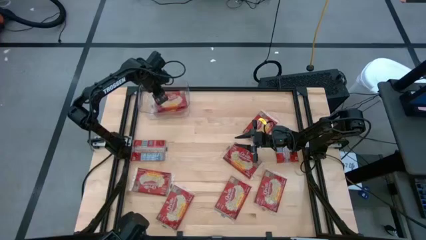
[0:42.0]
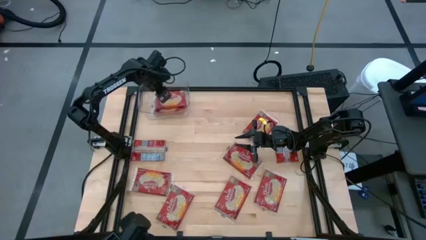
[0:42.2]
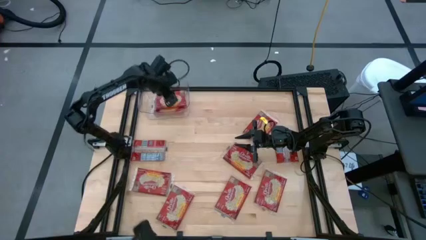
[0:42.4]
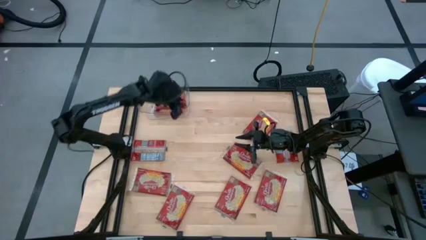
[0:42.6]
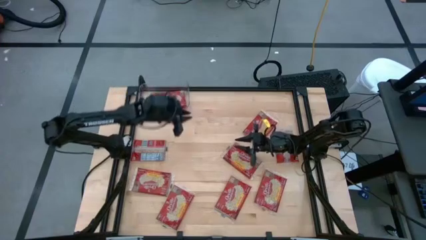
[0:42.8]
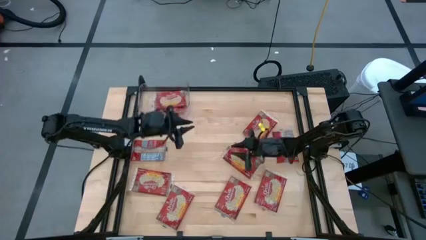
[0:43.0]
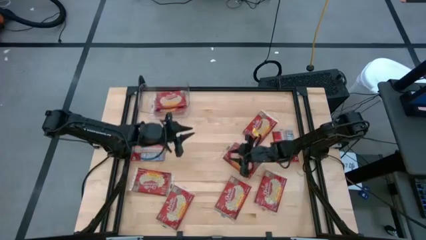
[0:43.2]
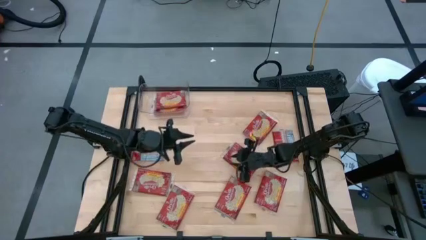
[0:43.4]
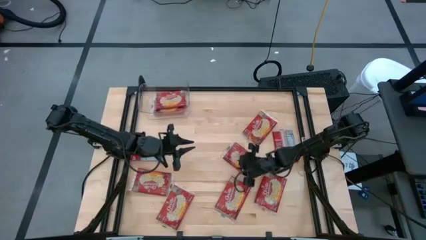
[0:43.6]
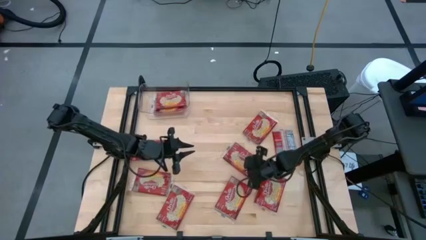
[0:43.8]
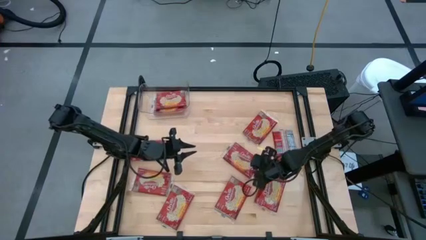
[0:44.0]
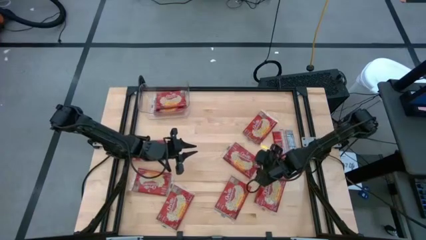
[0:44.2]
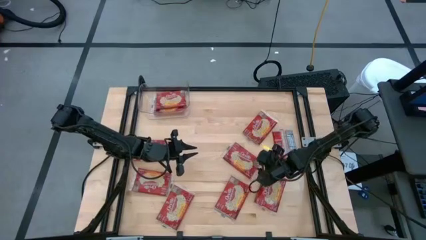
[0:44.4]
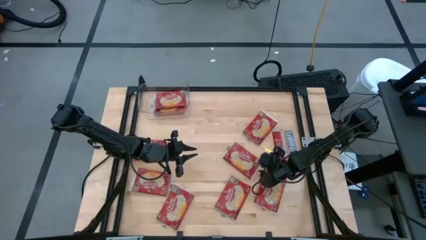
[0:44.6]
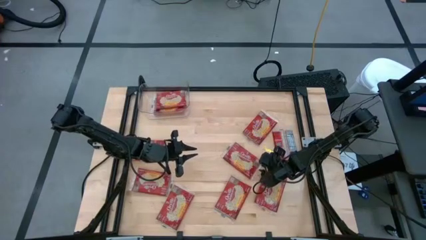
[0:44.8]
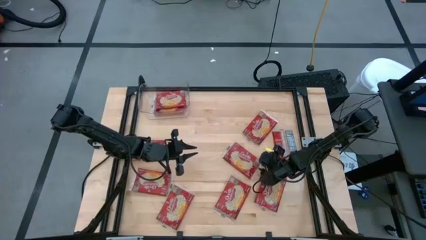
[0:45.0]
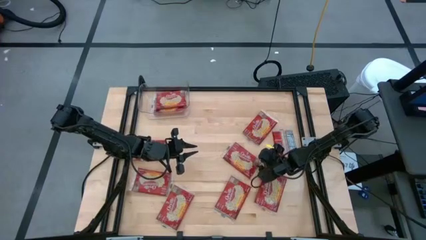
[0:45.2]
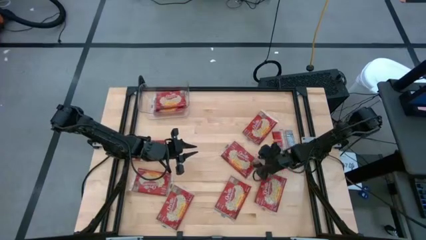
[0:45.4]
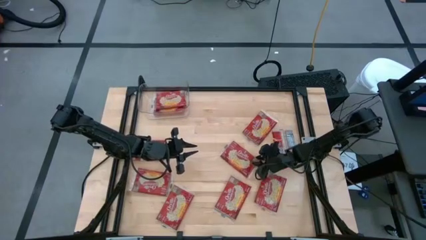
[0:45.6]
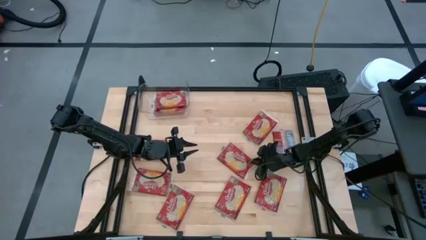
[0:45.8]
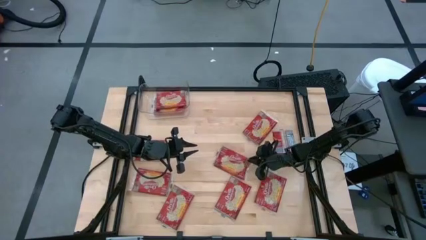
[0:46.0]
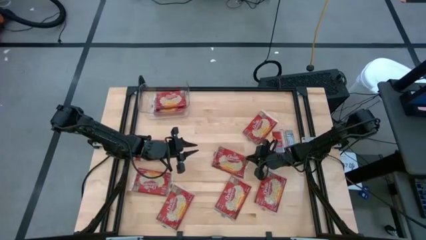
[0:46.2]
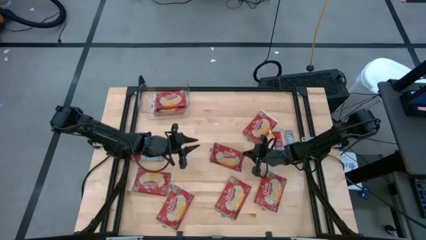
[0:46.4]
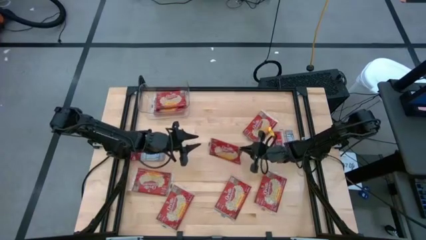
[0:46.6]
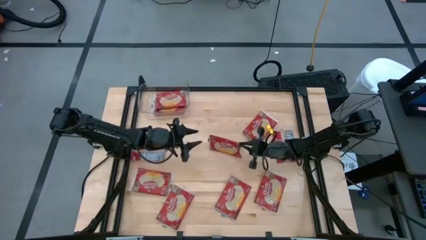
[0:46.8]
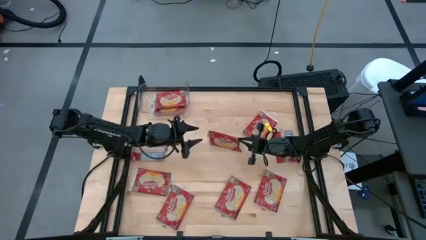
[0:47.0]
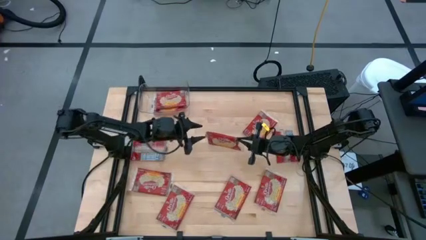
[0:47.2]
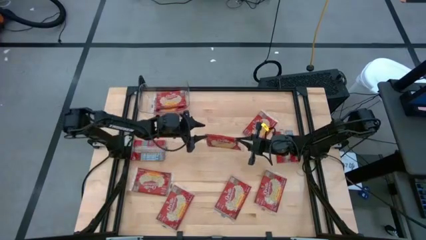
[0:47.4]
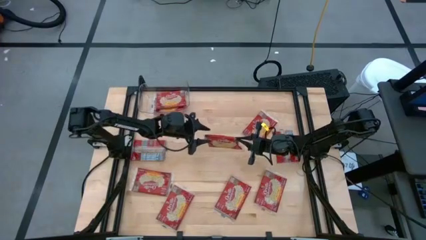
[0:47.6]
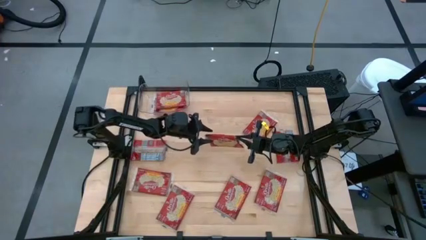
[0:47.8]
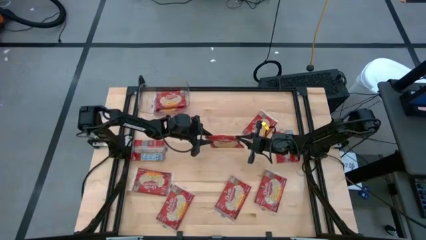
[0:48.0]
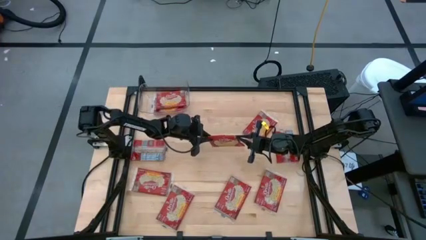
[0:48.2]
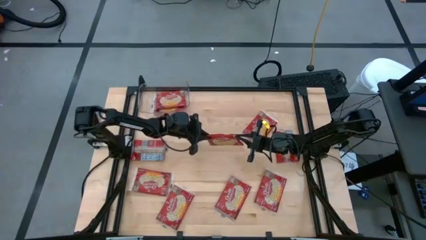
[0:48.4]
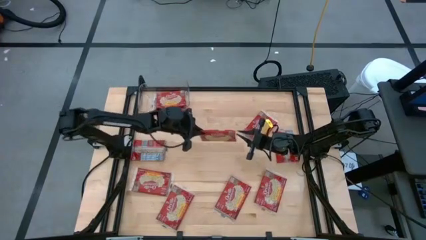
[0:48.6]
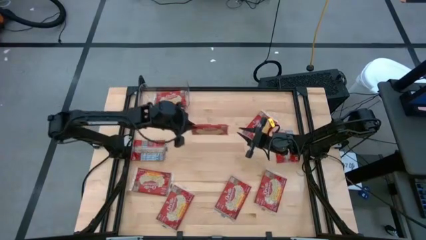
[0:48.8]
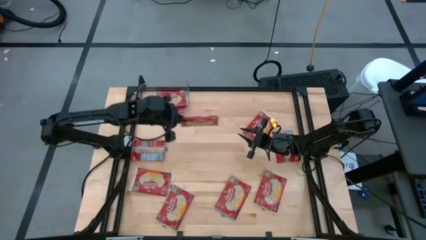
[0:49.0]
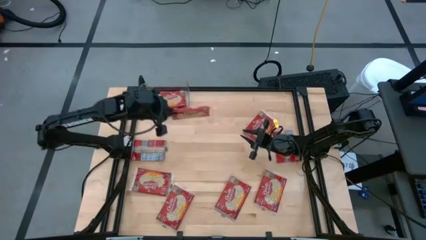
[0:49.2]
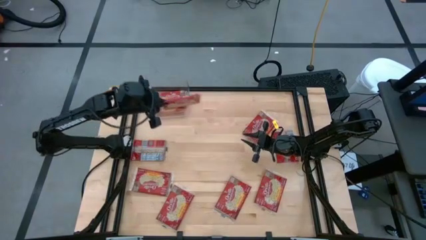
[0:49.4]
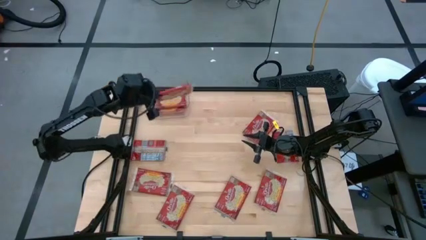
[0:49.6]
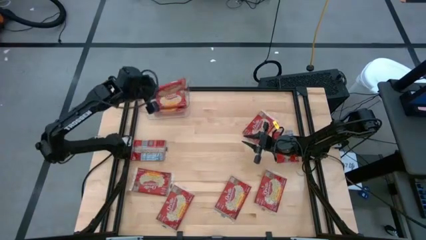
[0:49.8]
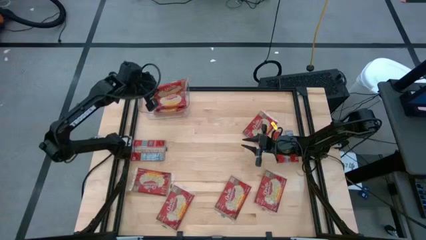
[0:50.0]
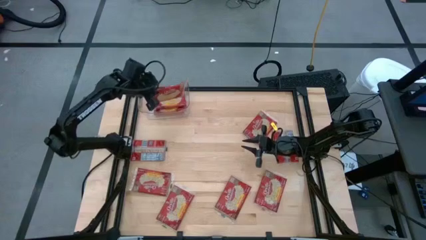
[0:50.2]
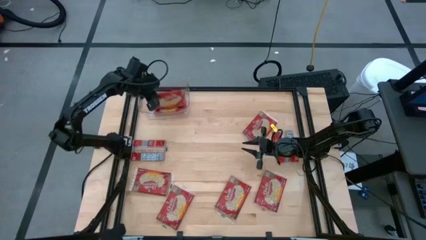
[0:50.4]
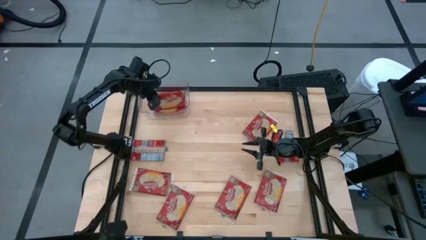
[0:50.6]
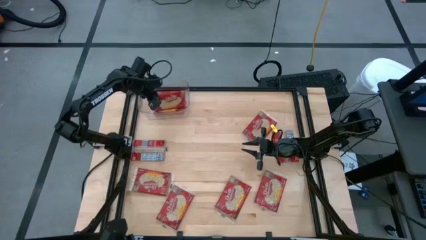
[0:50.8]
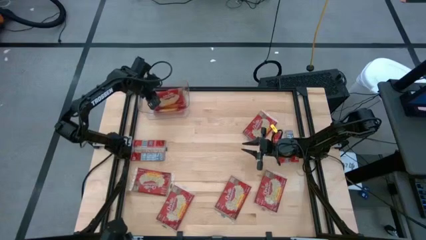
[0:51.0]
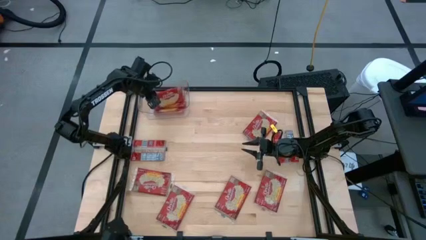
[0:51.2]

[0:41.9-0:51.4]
Task: Sort popcorn bags into baskets
Put the red popcorn bag into the transparent bin

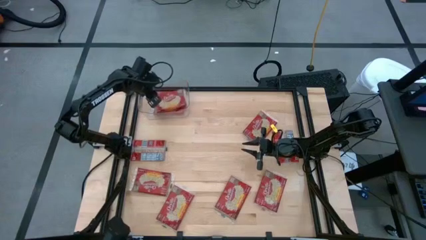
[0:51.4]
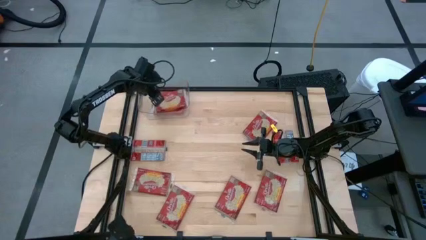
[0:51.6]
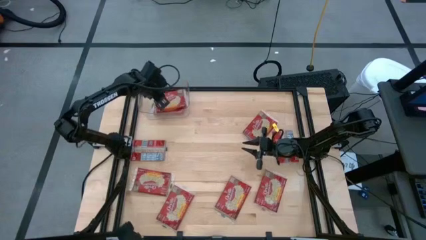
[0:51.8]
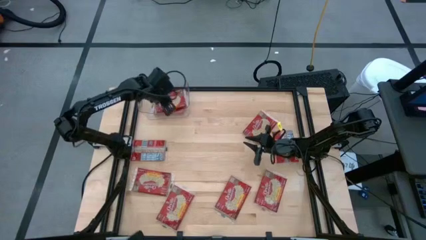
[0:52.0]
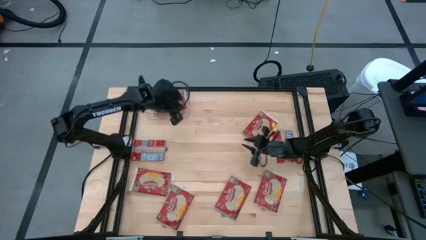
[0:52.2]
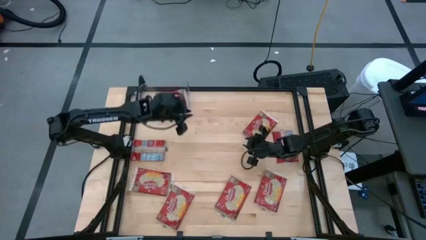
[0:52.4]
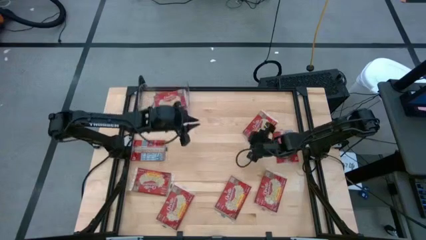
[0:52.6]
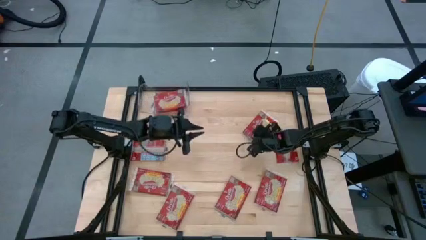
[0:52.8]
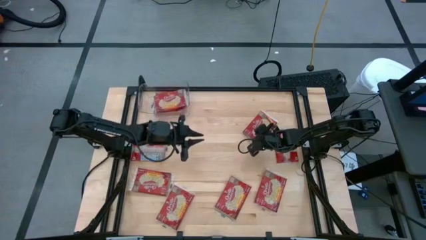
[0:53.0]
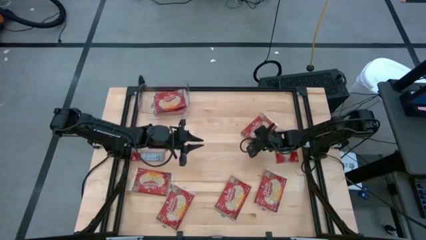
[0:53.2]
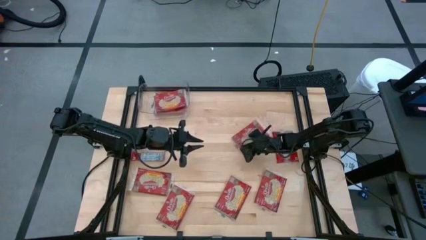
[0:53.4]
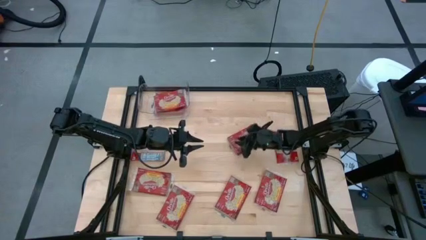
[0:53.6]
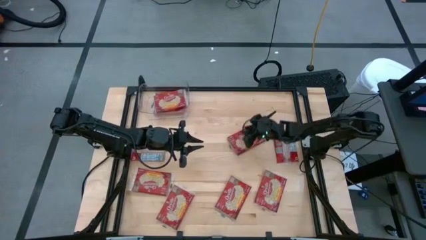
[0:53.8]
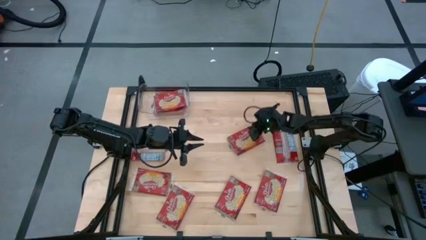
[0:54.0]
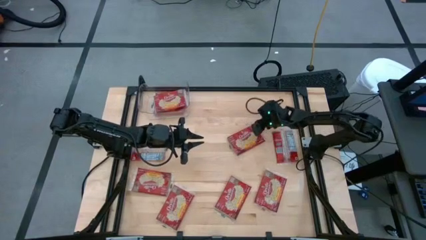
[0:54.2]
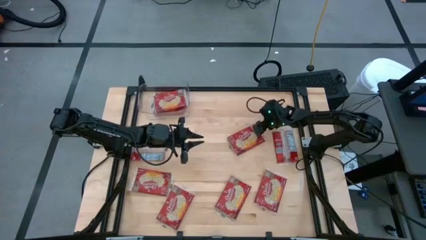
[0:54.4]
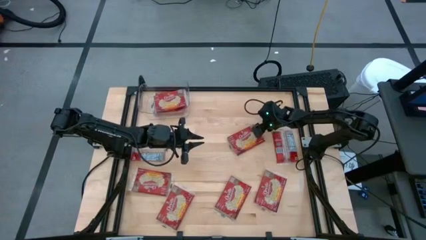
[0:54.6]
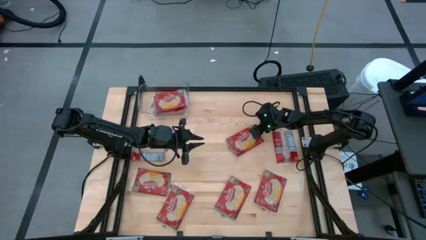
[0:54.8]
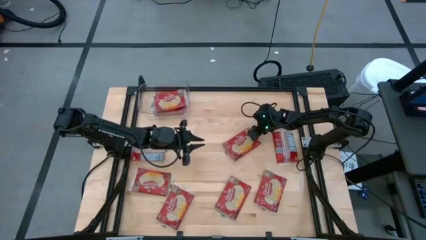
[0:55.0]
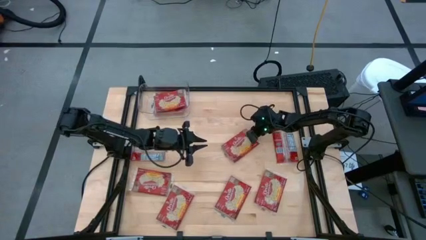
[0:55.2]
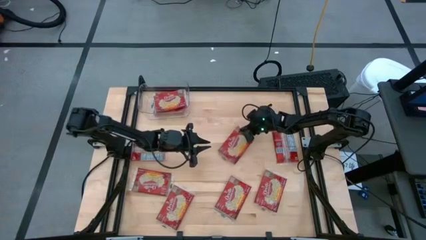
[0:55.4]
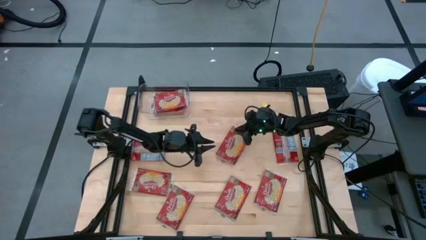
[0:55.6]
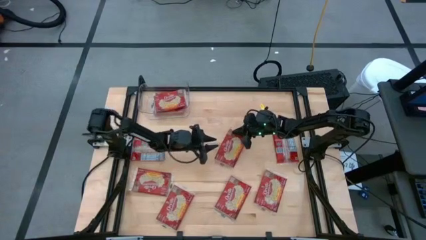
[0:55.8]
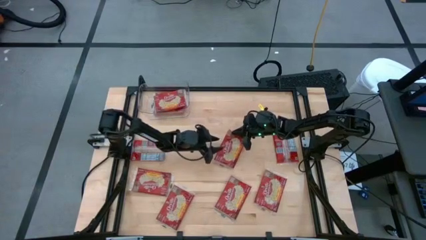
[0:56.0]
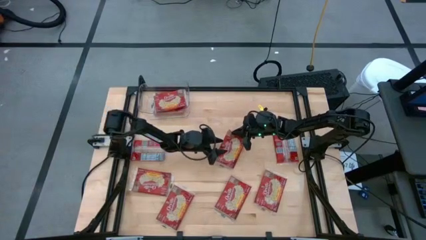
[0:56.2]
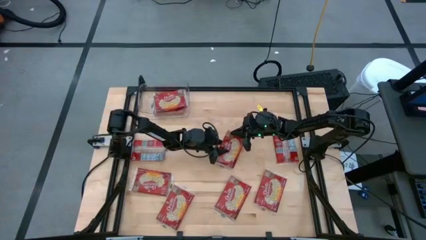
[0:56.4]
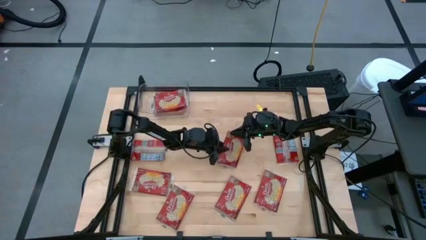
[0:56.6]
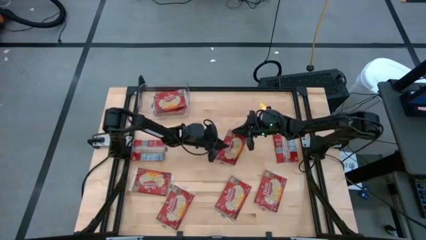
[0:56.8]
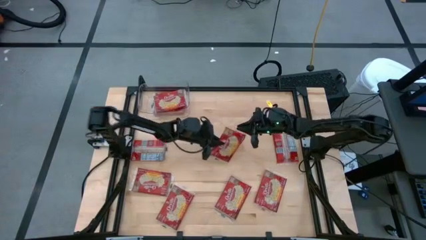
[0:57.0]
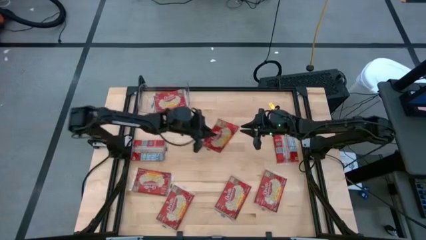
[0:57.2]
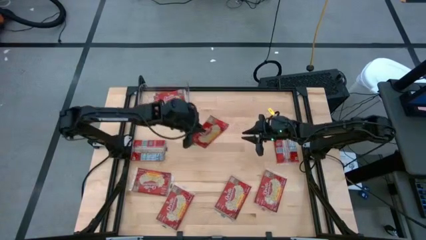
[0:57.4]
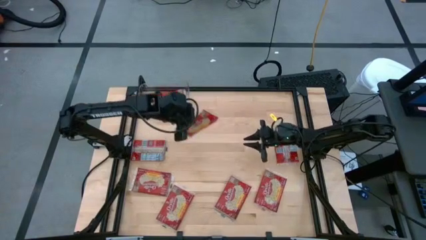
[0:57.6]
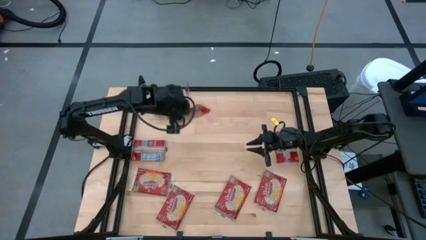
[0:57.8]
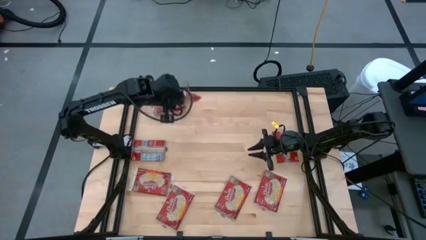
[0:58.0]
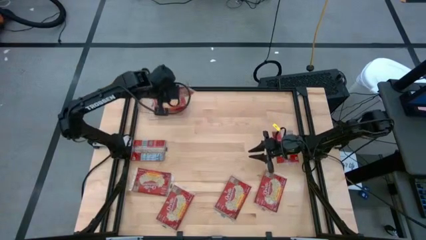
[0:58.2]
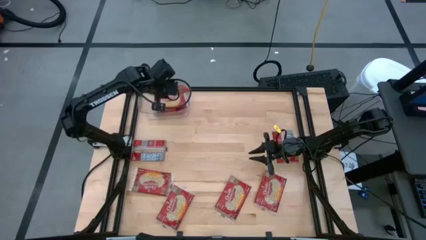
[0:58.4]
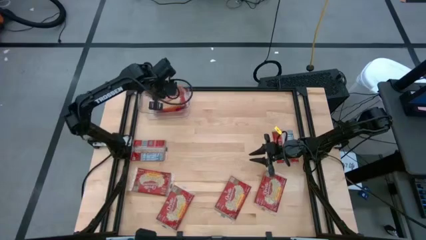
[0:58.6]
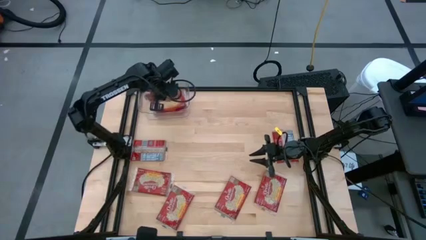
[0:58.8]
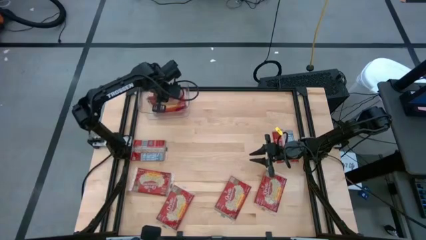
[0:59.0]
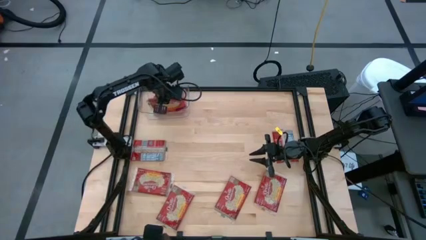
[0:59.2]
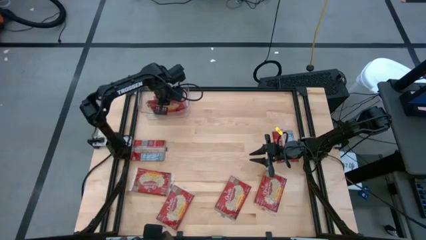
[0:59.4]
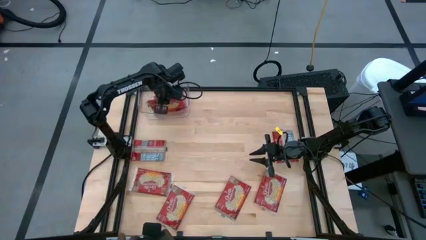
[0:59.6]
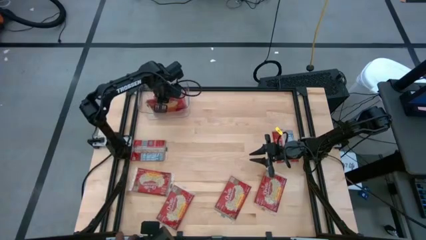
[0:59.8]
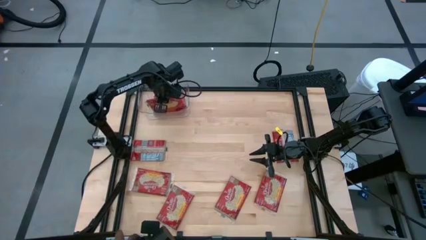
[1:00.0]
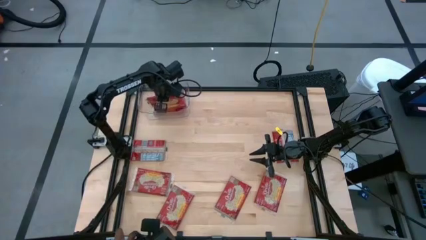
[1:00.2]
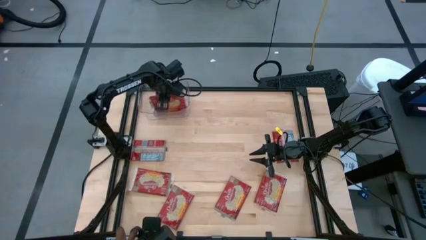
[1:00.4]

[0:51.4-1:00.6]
Put the red popcorn bag into the transparent bin
